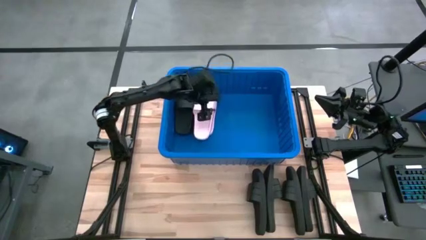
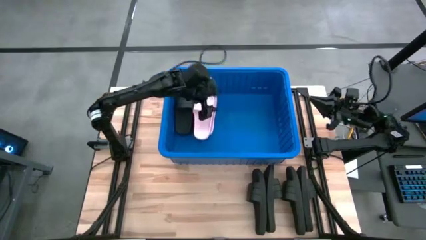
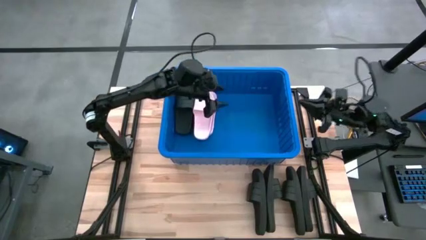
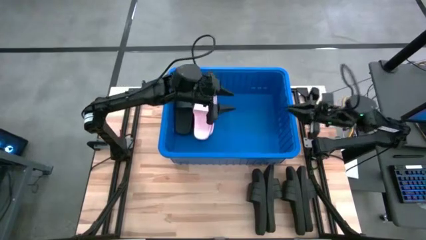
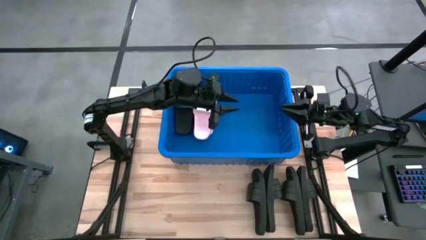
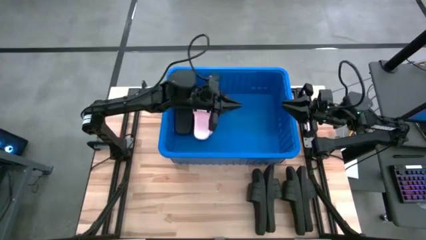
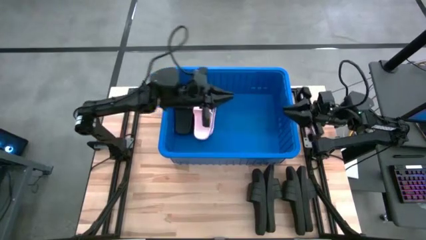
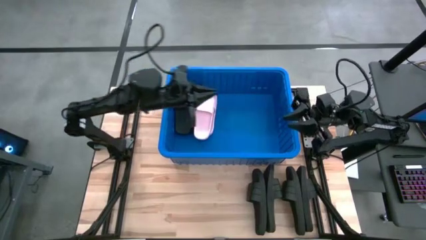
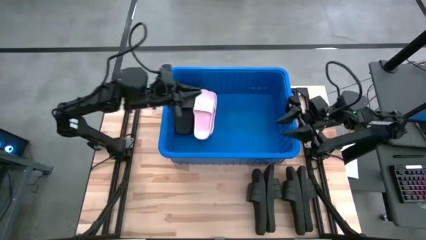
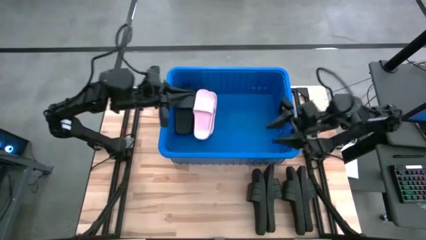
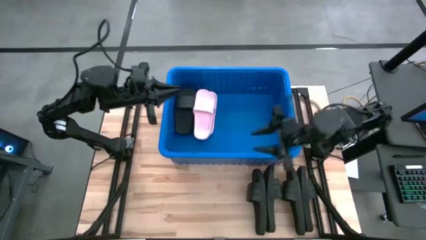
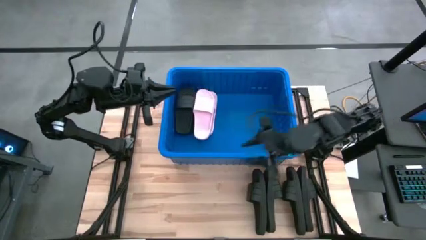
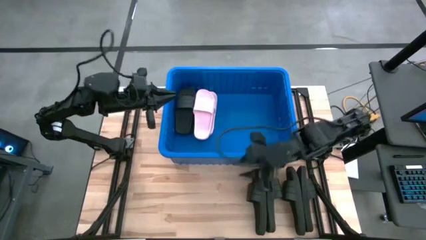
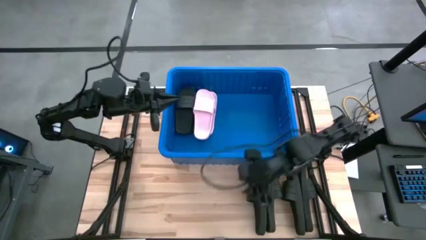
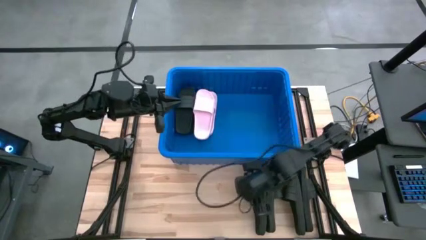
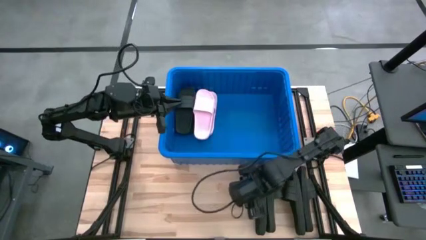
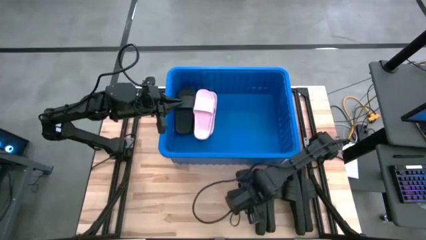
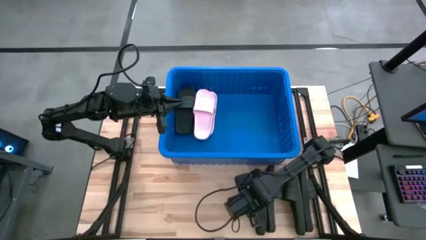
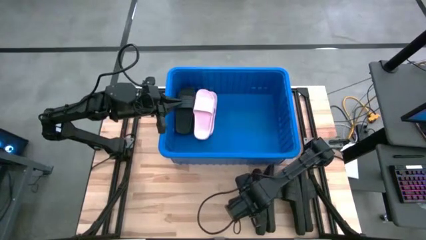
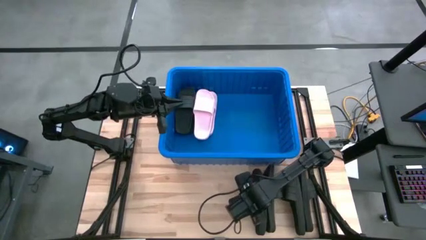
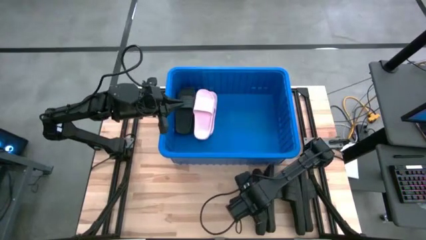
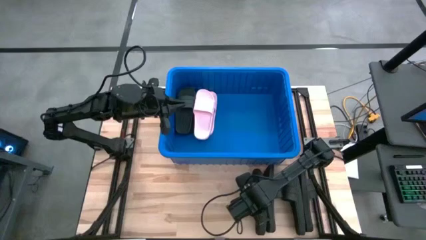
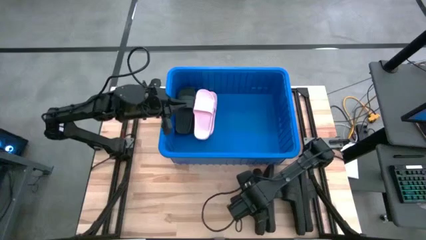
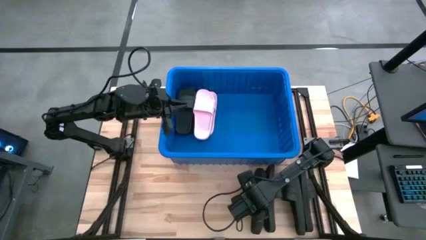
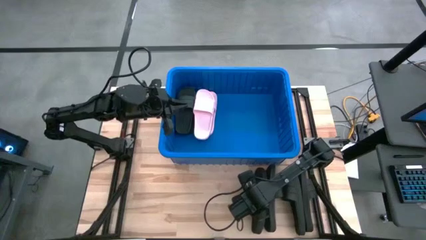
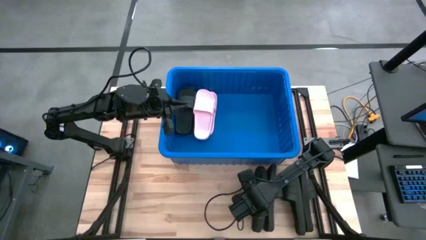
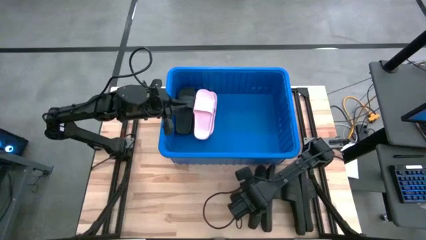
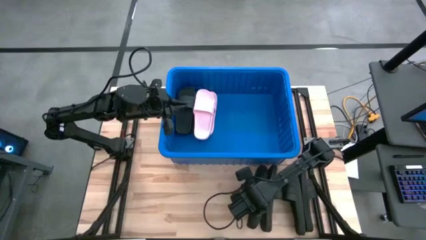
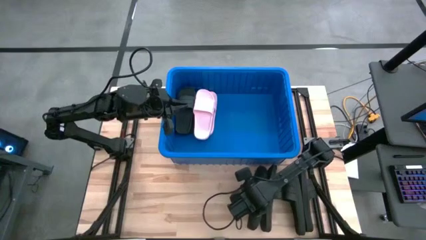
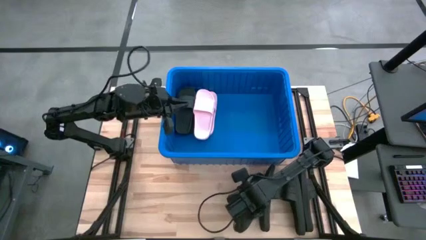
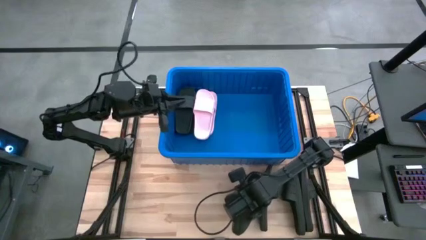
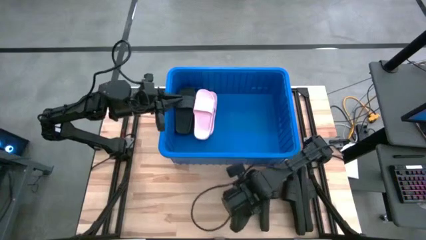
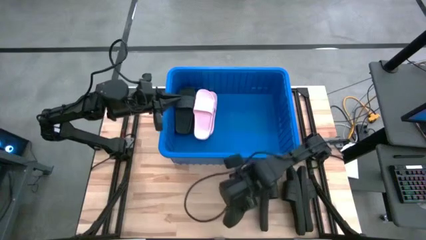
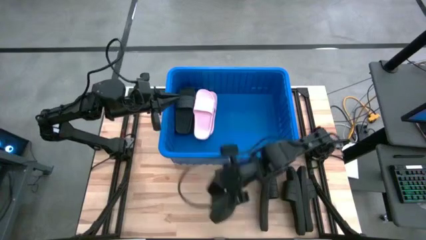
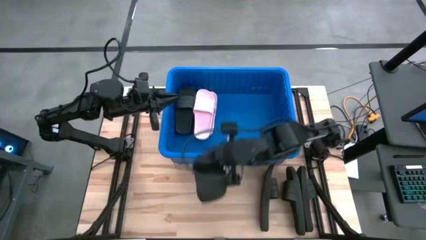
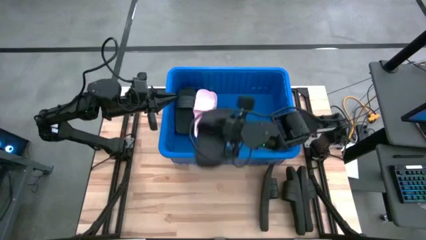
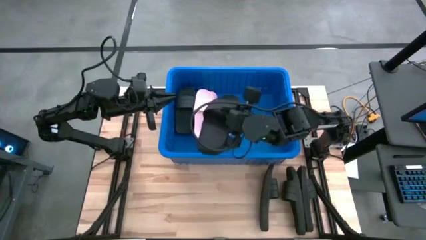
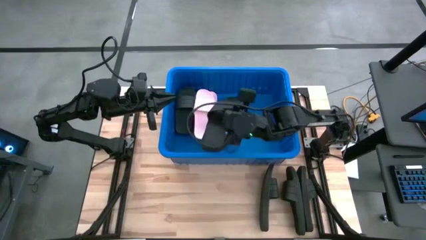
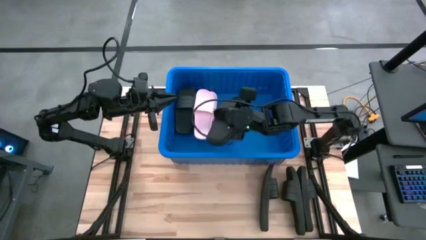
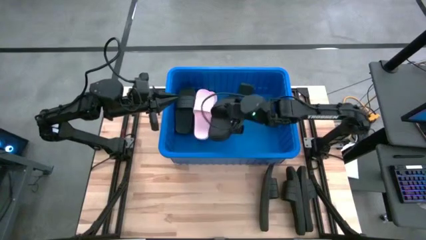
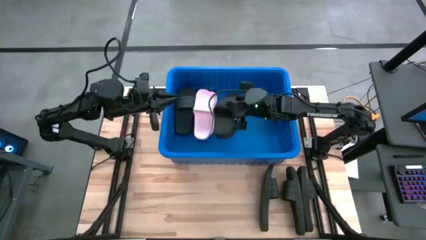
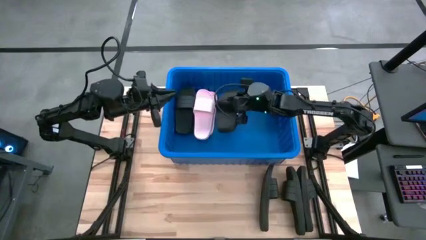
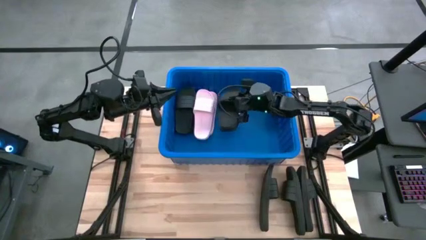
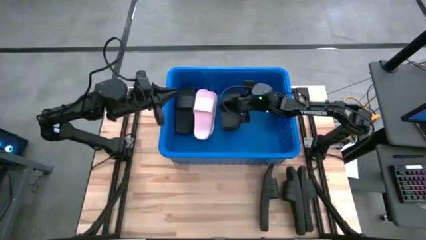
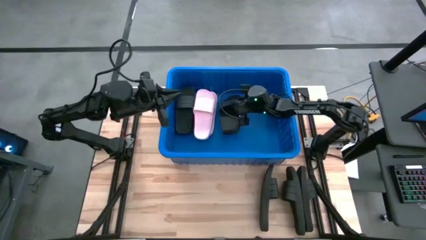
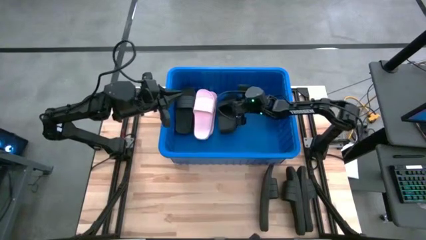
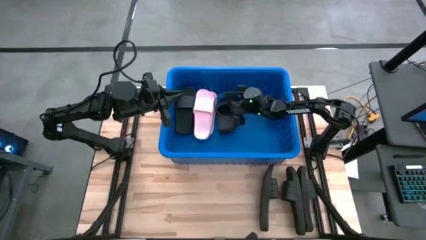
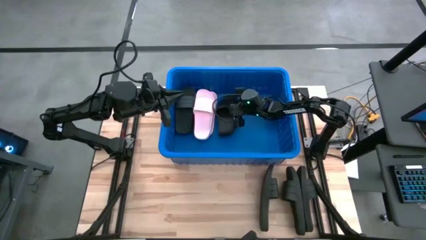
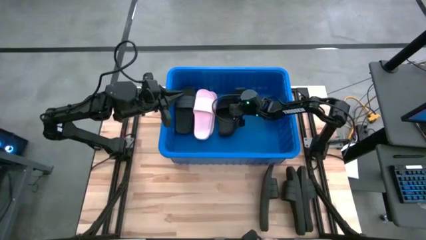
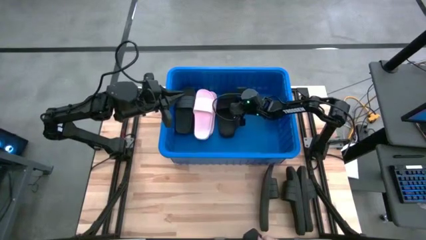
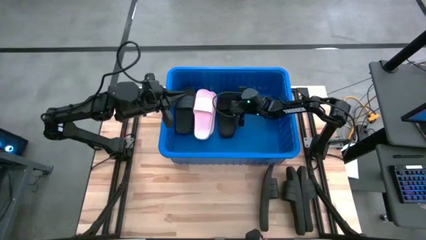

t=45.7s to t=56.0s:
Task: Pick and place slides into bin
Put the black slide into the blue container
